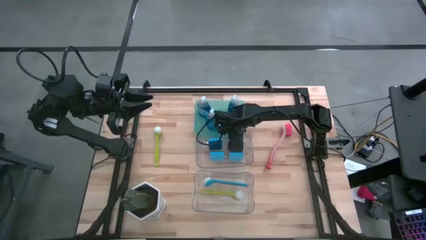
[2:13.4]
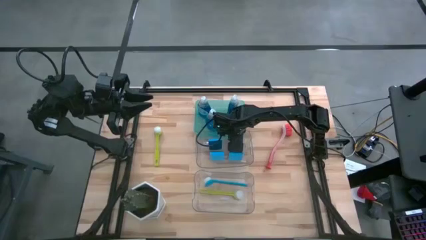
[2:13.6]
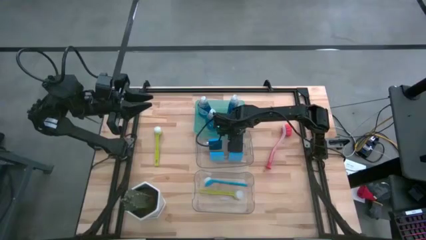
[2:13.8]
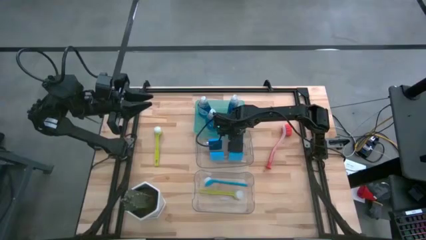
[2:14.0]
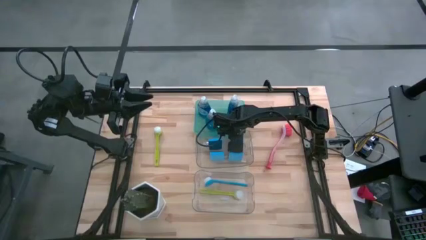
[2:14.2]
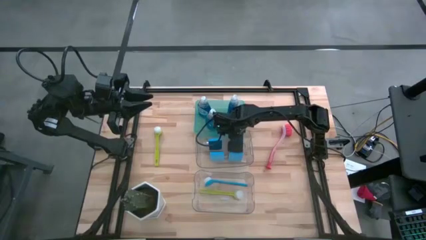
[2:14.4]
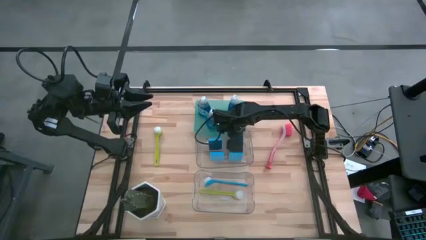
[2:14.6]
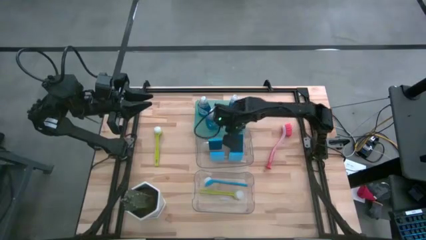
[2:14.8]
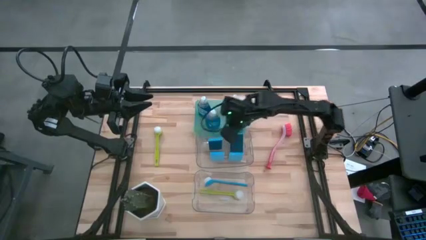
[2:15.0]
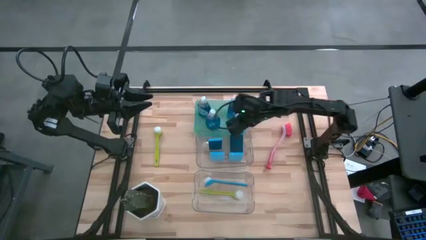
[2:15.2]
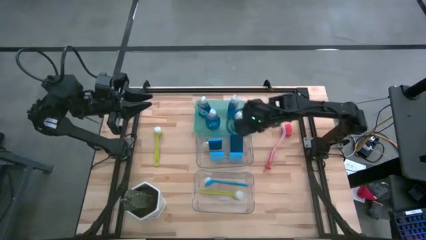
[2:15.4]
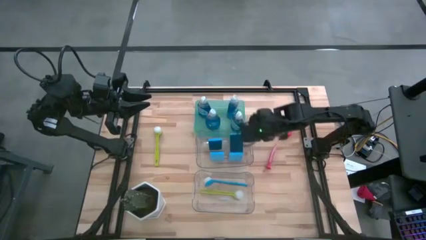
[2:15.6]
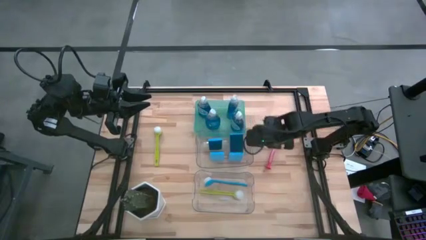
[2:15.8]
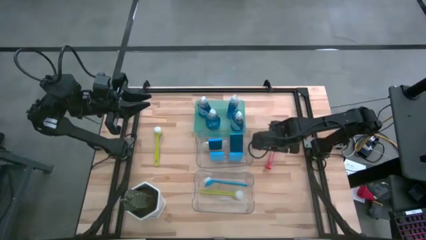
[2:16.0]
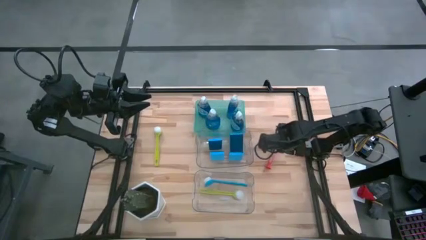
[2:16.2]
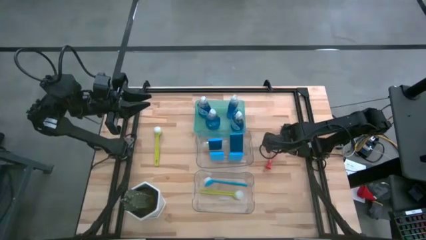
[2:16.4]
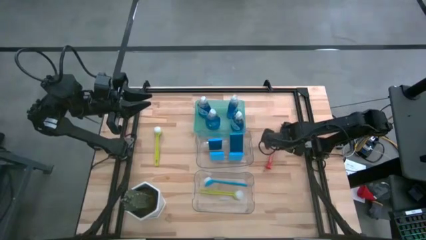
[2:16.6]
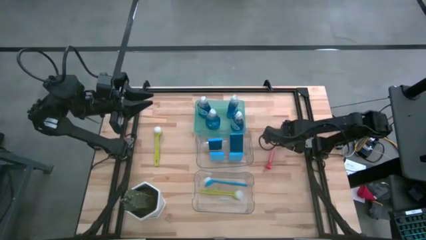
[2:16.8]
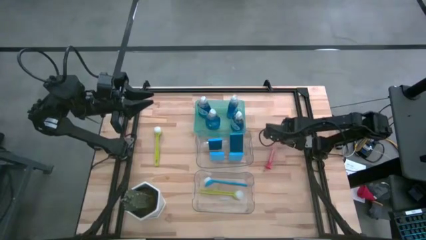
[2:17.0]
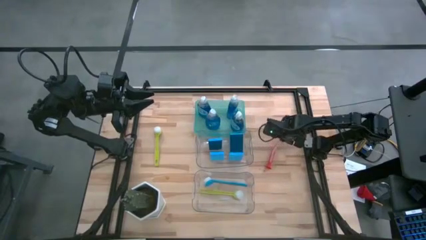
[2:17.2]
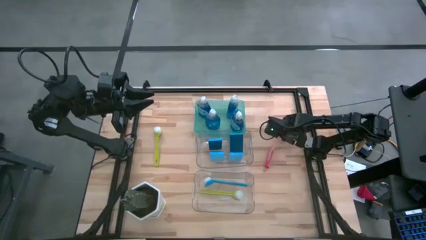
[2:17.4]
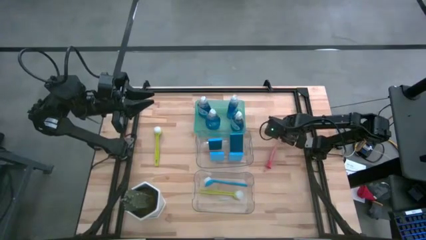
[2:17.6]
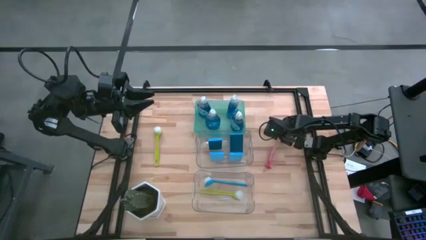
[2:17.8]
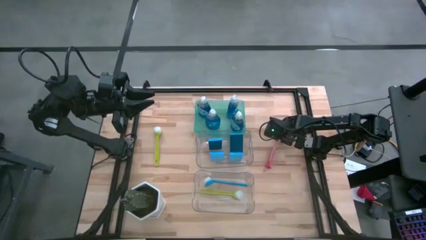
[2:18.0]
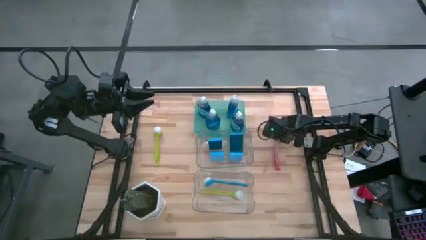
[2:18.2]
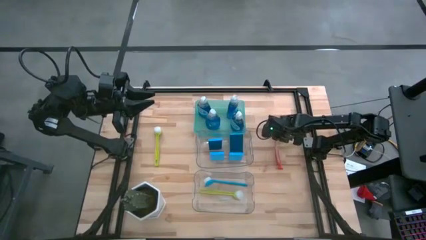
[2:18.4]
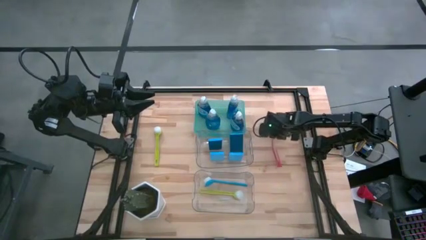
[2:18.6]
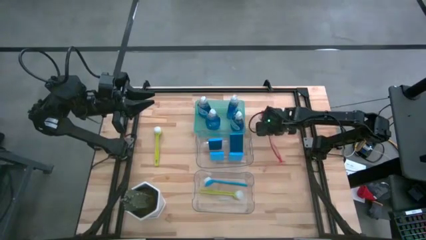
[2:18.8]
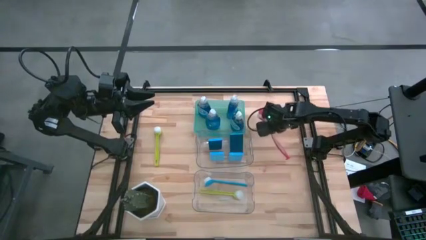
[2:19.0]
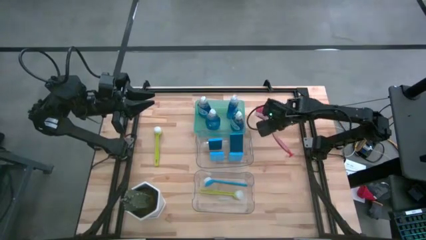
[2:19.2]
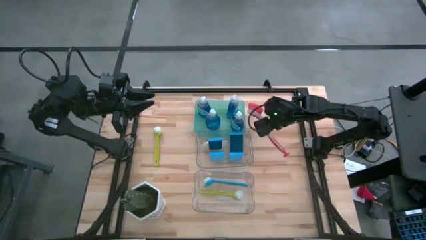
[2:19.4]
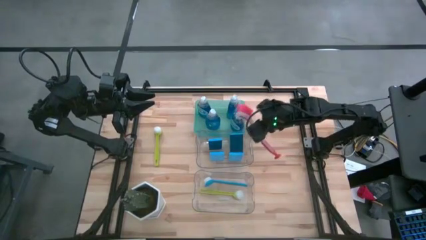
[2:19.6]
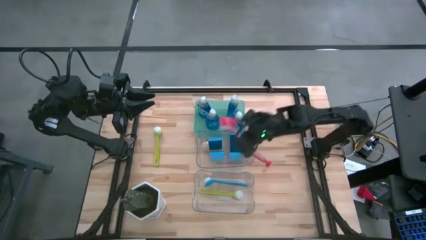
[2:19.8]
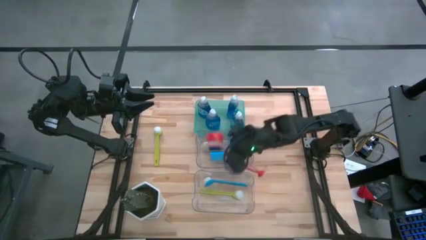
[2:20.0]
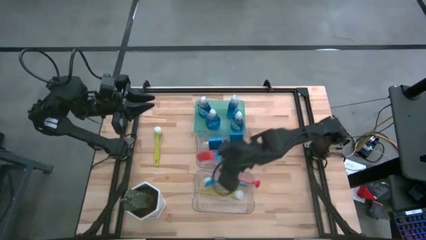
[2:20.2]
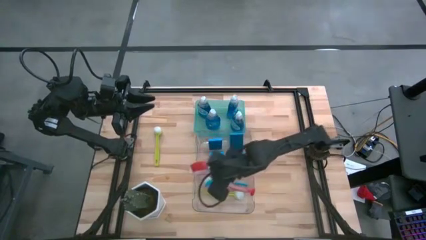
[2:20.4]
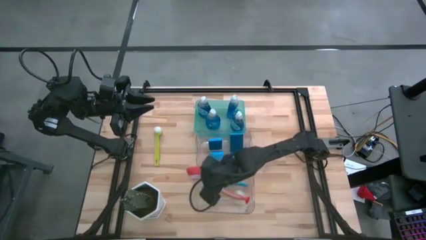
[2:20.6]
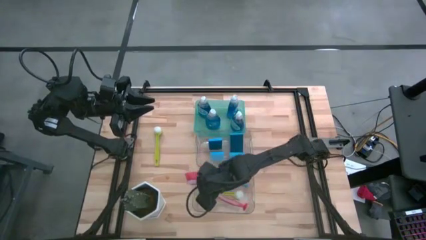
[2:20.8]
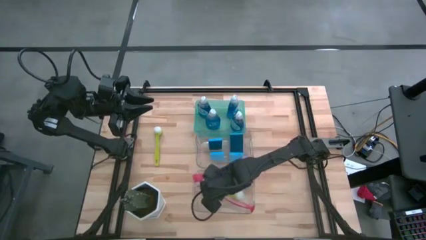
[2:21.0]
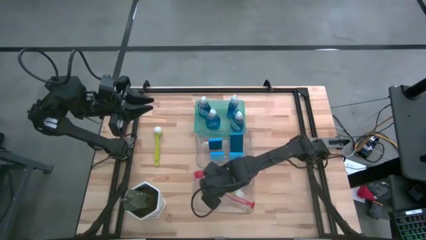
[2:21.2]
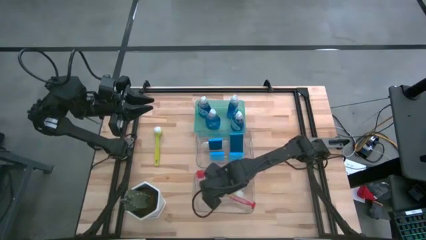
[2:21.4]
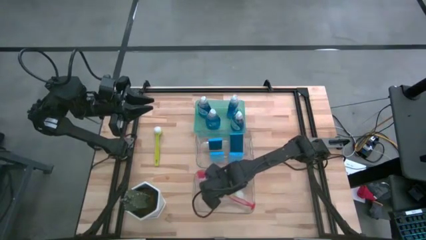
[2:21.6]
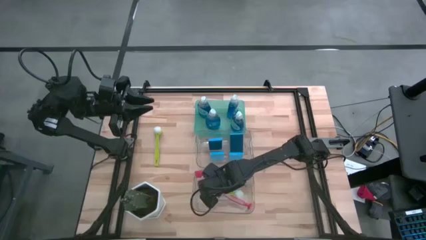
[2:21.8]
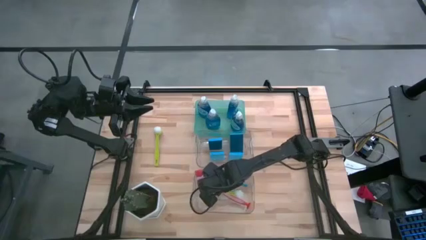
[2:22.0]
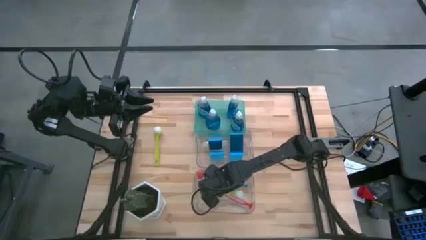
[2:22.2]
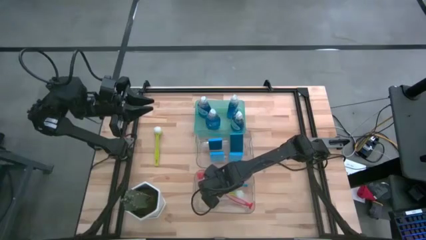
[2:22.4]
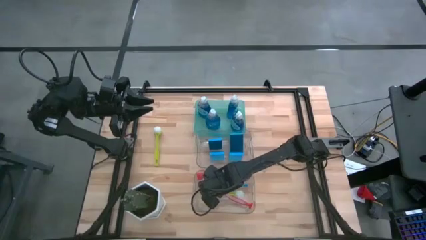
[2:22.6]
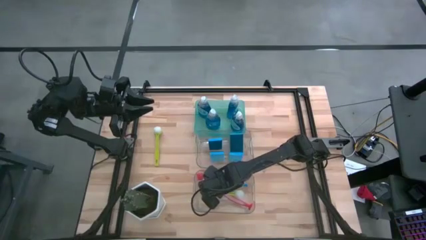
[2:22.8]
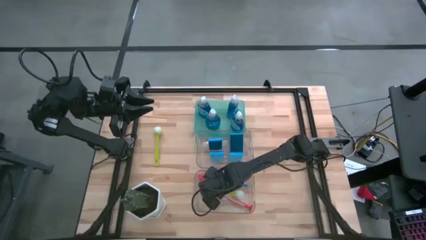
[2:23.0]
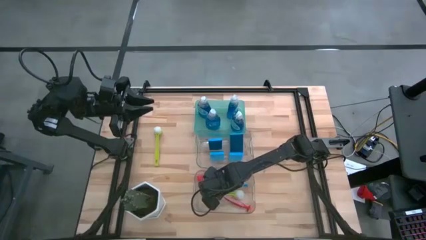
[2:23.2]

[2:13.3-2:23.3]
Task: Pick & Place Kitchen Sink Supplies
Put the orange dish brush into the bottom transparent bin

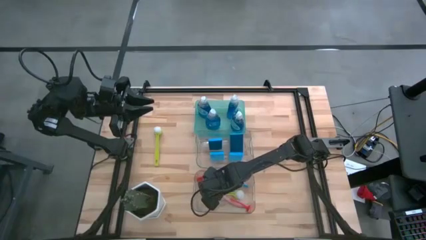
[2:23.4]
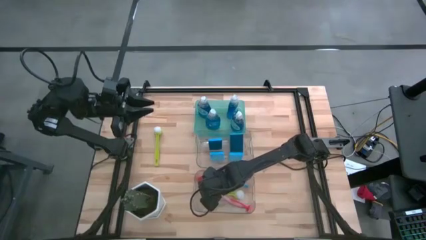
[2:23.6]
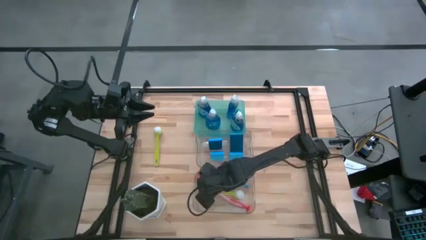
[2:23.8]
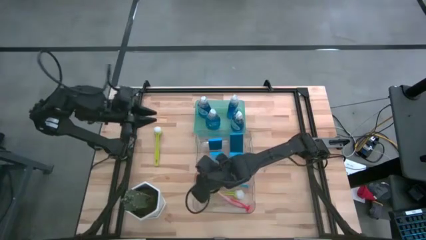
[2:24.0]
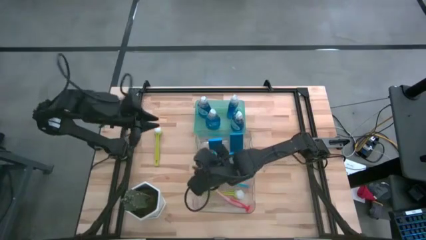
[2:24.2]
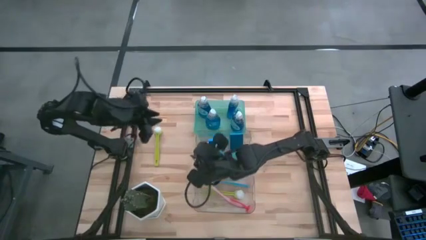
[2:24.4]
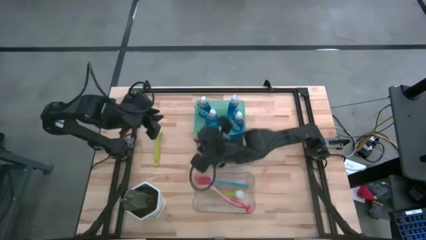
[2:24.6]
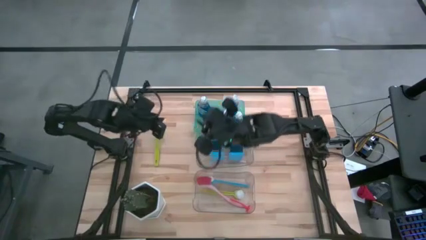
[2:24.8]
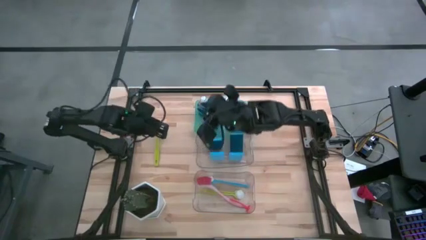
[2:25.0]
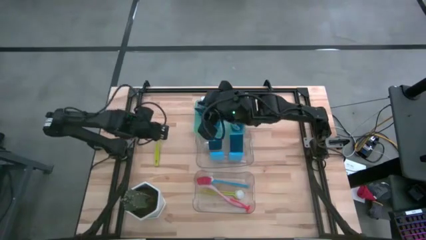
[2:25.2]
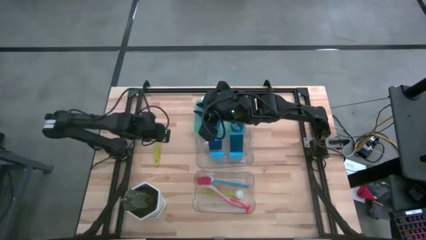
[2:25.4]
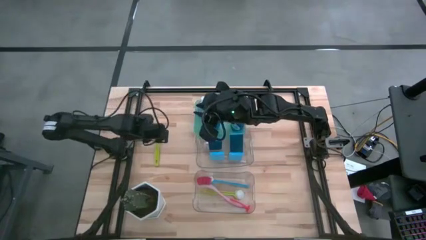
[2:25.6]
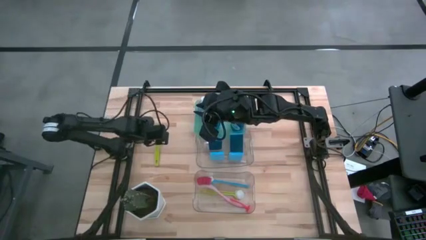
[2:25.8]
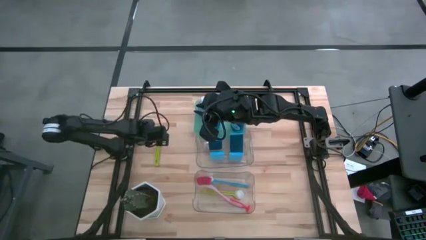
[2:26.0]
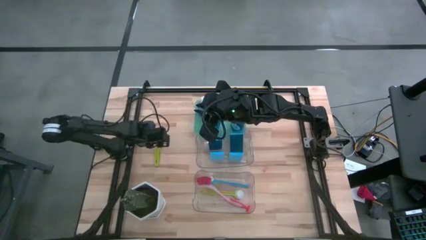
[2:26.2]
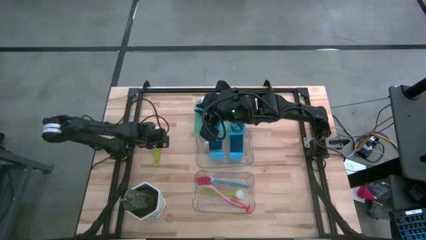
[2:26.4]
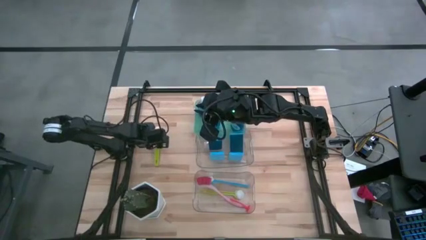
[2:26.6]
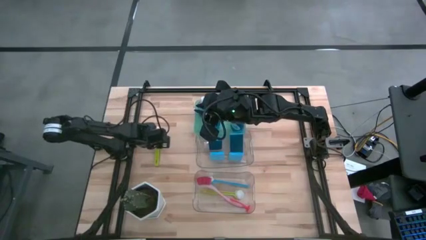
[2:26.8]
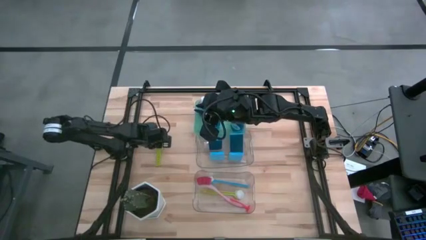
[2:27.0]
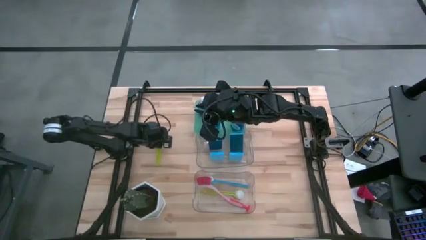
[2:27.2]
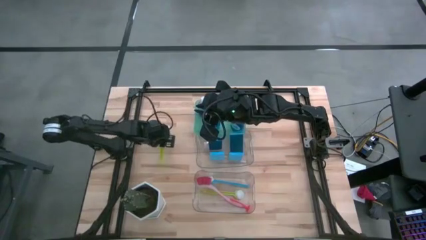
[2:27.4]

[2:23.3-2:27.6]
Put the light green dish brush into the bottom transparent bin

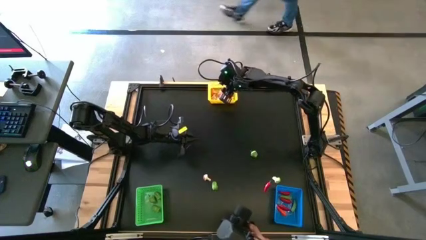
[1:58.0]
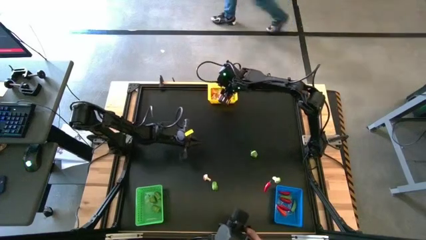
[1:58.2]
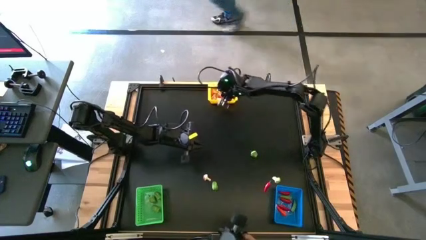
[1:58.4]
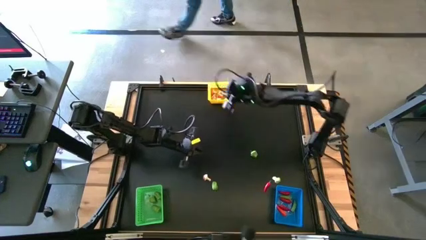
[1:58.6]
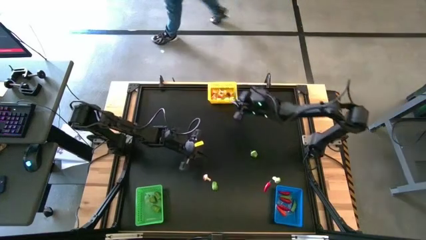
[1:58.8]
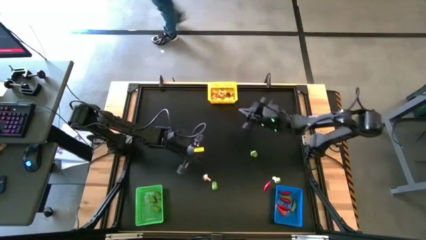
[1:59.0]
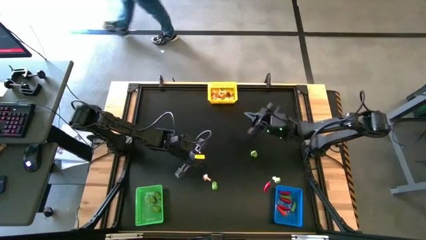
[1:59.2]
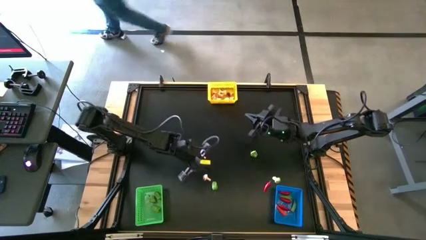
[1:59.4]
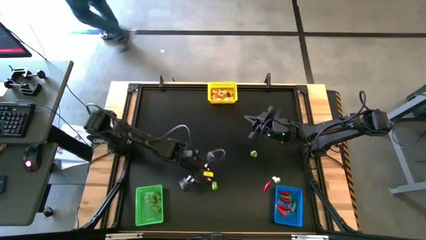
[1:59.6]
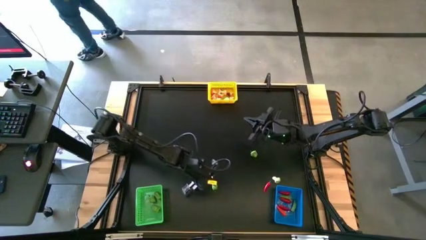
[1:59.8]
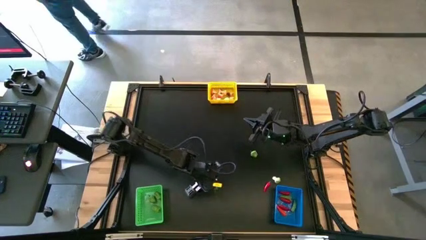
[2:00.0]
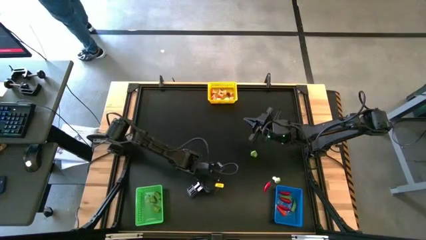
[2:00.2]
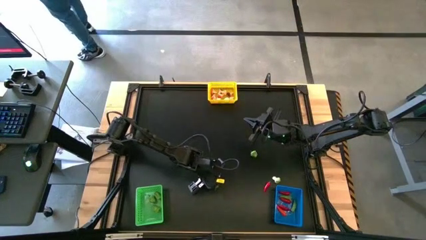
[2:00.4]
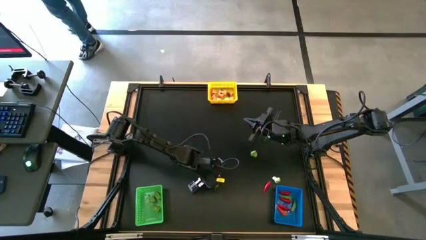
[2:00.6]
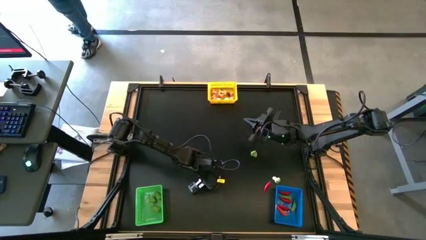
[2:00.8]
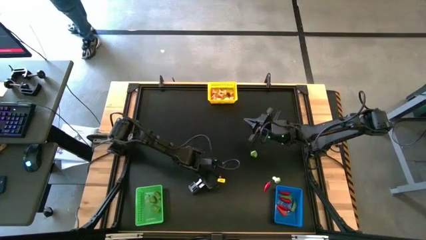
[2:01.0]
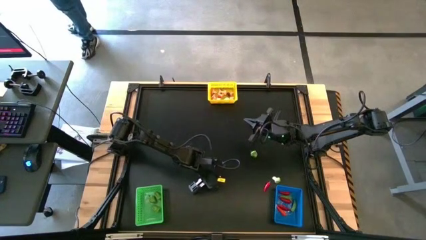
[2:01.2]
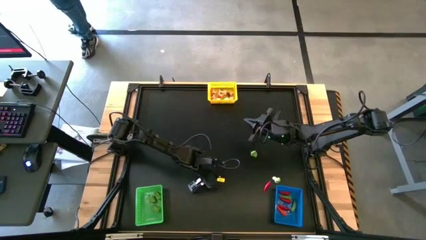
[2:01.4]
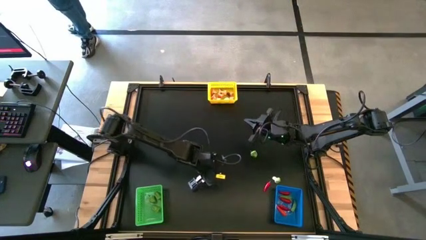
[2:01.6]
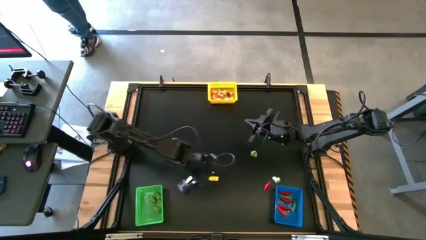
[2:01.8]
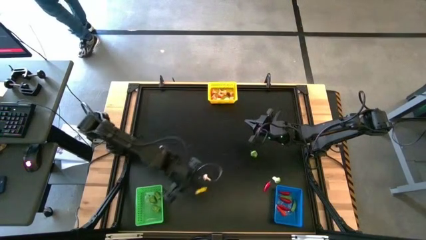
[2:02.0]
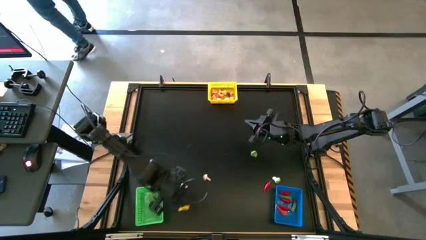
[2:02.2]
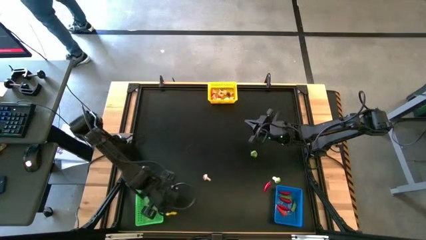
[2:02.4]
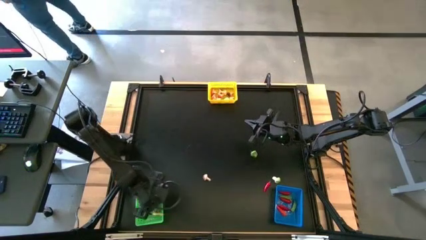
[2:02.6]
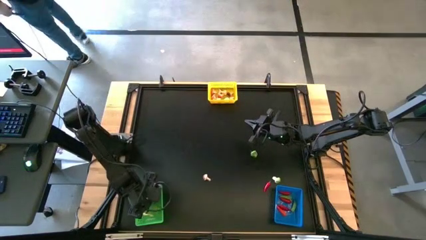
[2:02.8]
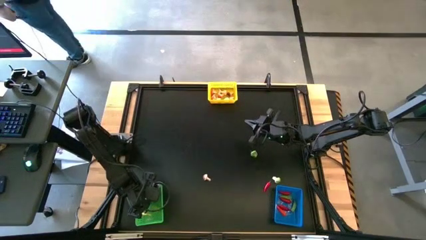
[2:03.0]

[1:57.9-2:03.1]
Task: Sort produce into baskets
Put the left green pepper into the green bin
